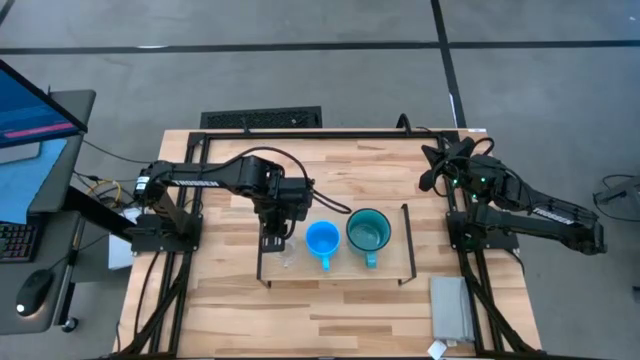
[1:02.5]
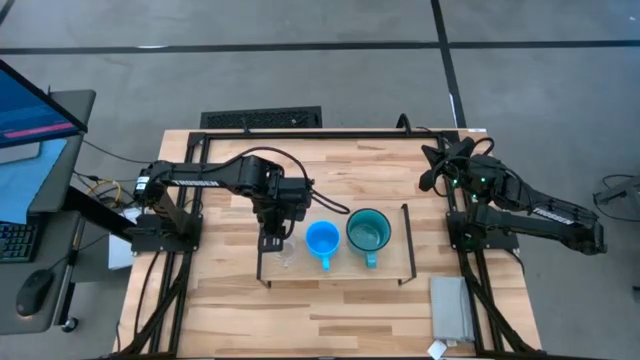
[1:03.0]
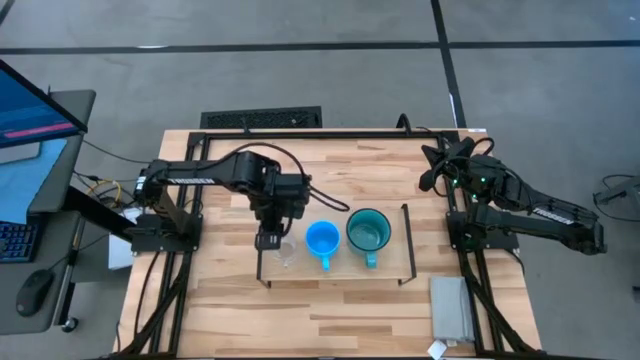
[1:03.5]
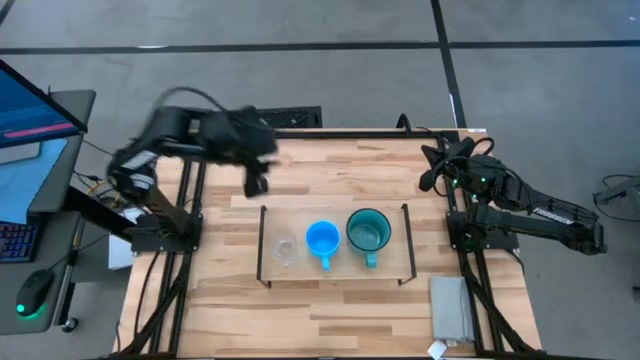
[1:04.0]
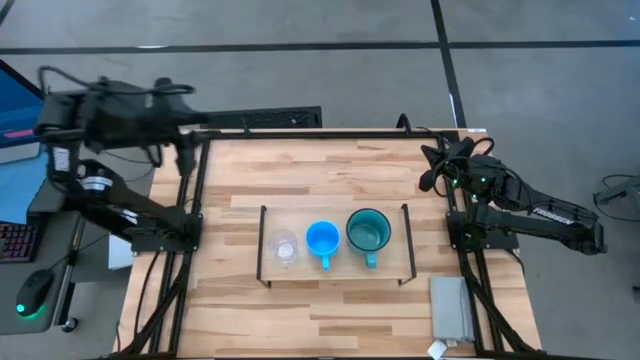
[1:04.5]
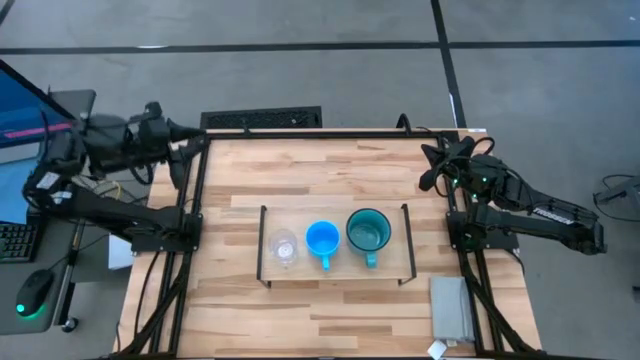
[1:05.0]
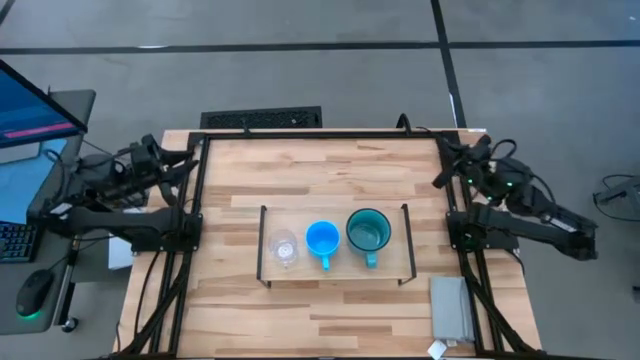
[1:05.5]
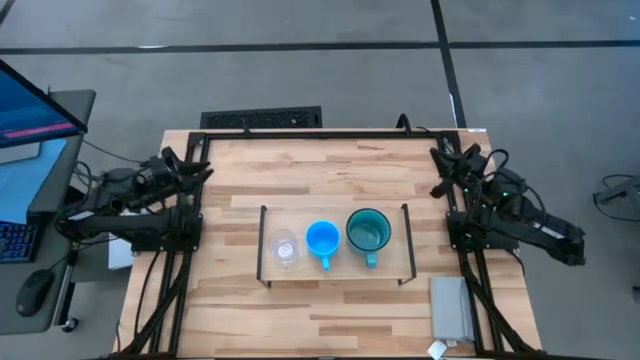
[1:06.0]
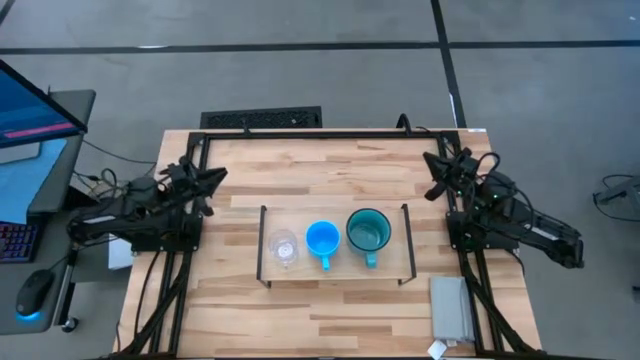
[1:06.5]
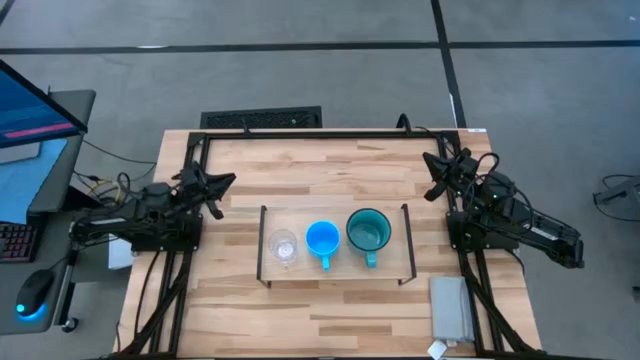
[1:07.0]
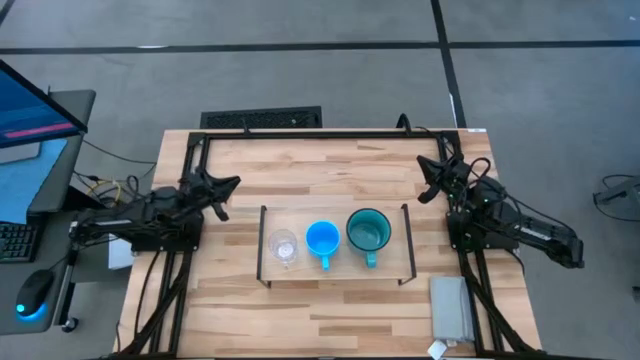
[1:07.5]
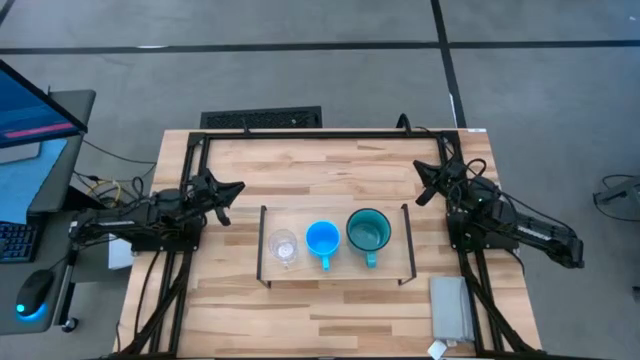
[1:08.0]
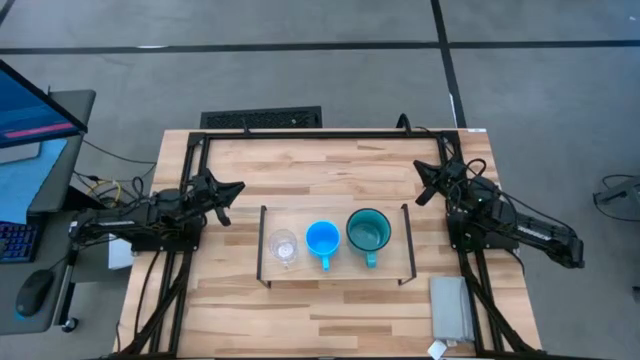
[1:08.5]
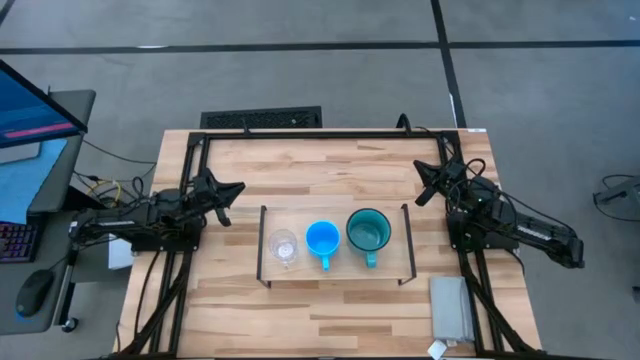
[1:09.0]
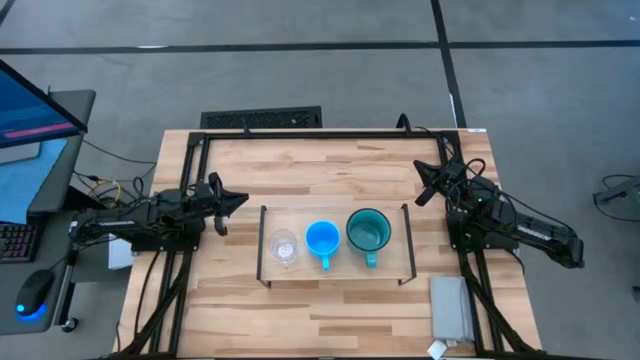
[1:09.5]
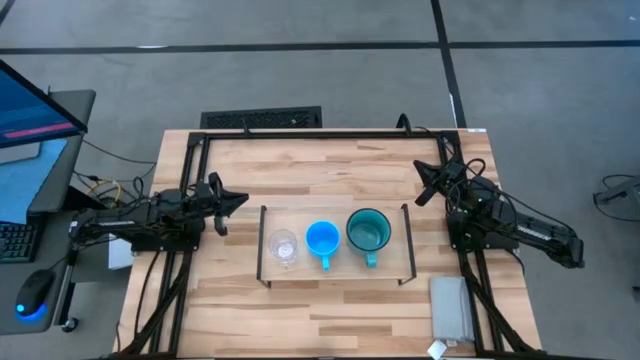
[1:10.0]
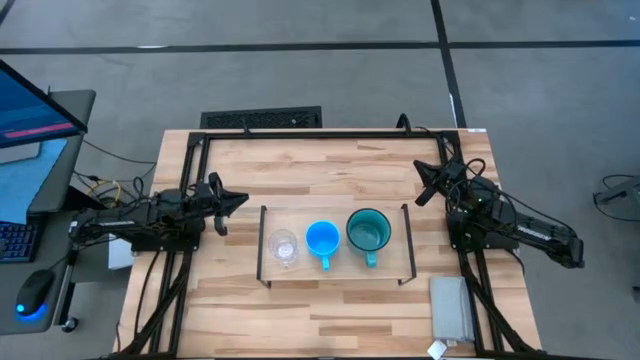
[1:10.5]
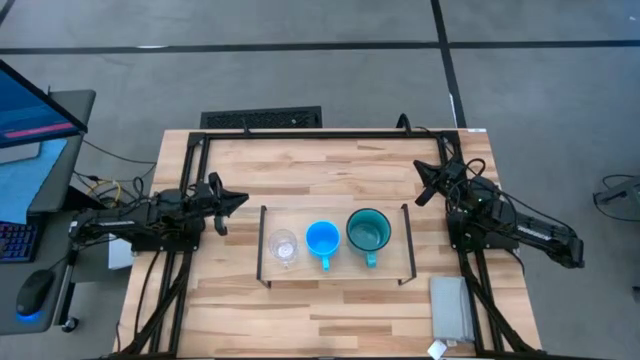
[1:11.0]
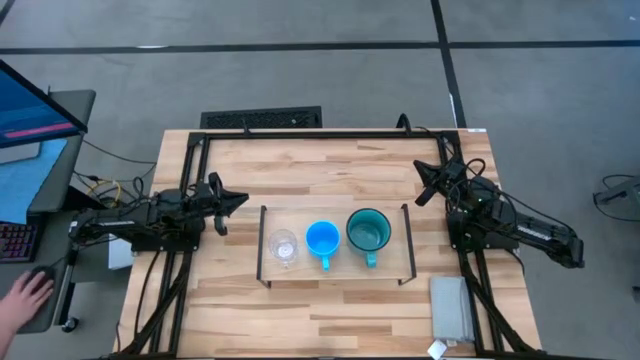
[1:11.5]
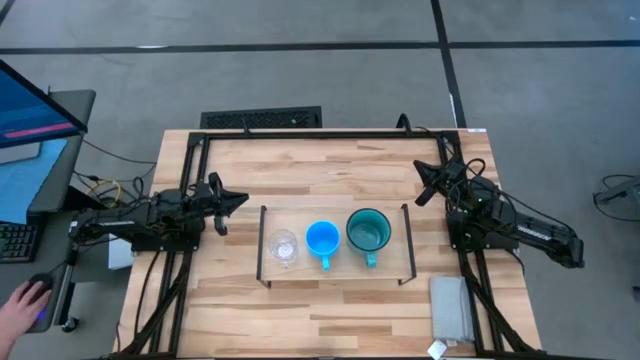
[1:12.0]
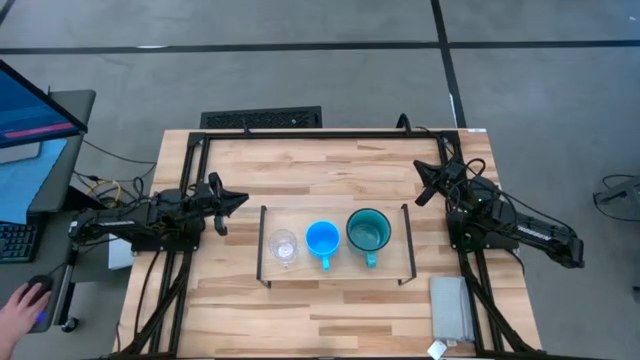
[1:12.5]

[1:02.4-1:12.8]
Task: Stack small to large cups/mugs on shelf
Return to Home Position

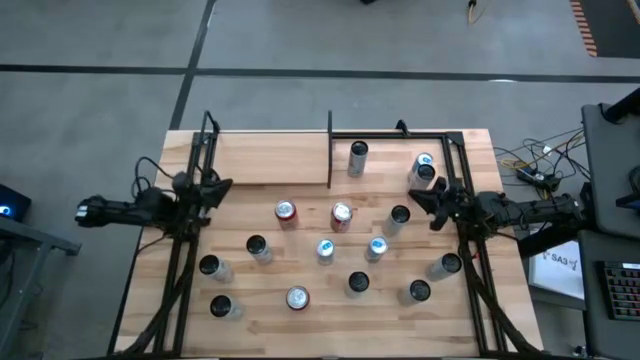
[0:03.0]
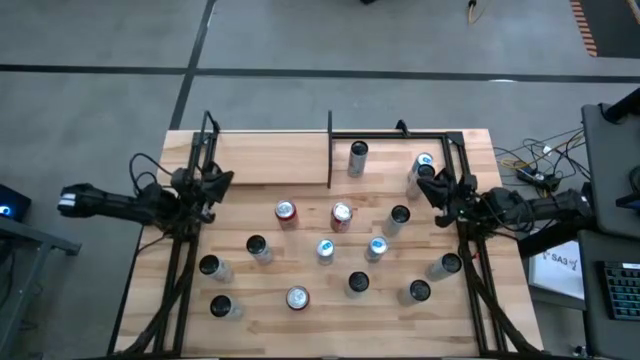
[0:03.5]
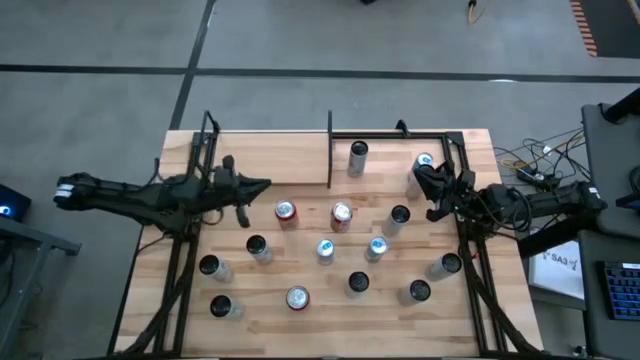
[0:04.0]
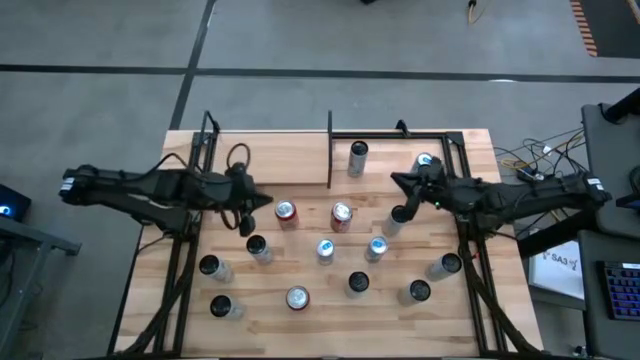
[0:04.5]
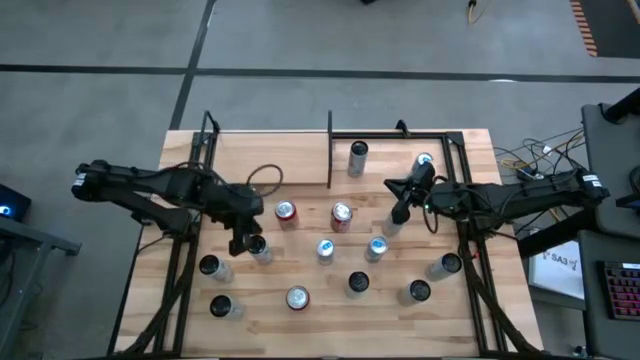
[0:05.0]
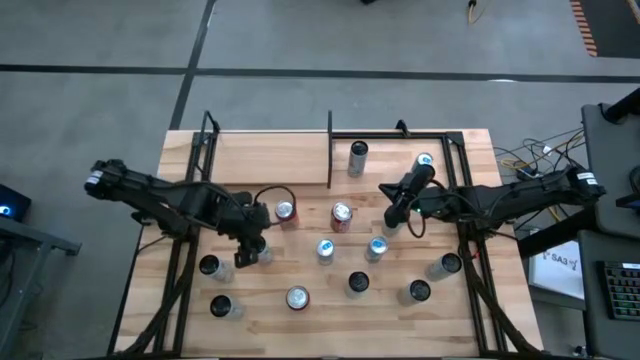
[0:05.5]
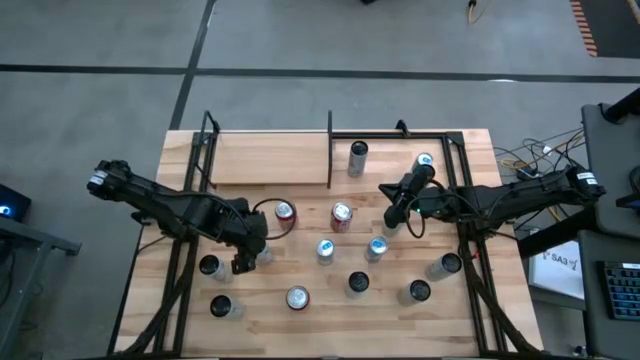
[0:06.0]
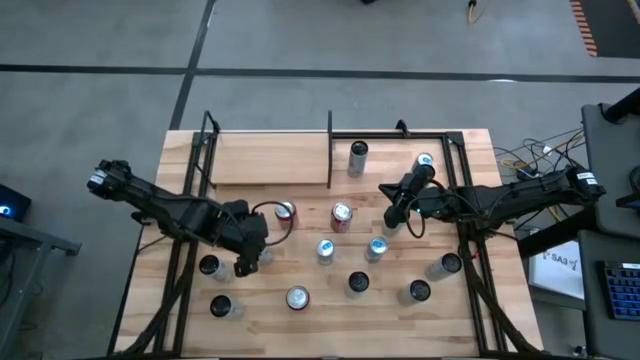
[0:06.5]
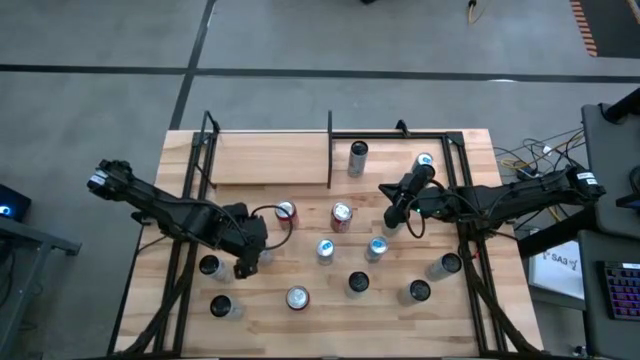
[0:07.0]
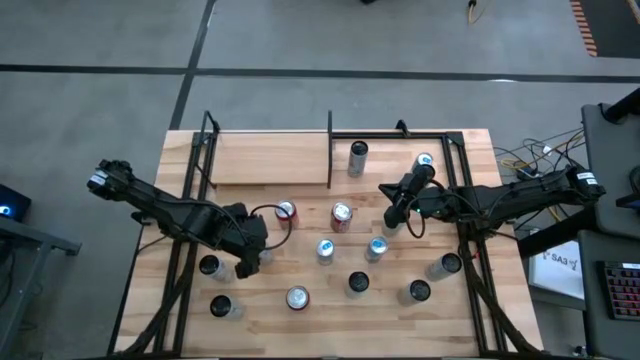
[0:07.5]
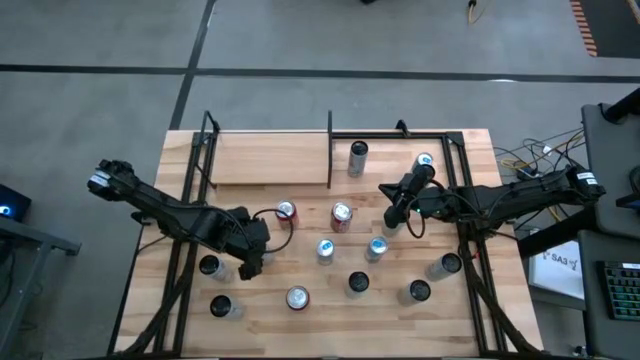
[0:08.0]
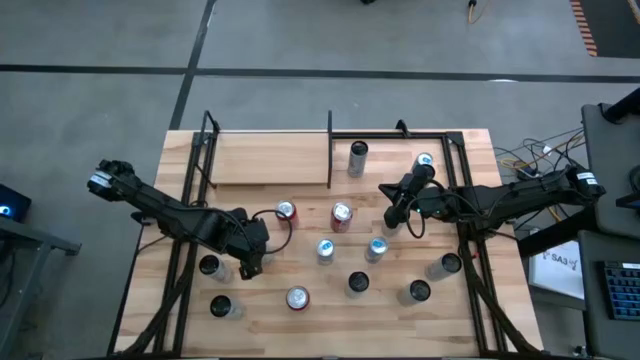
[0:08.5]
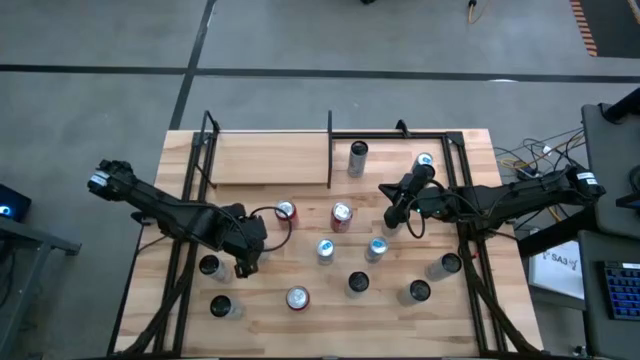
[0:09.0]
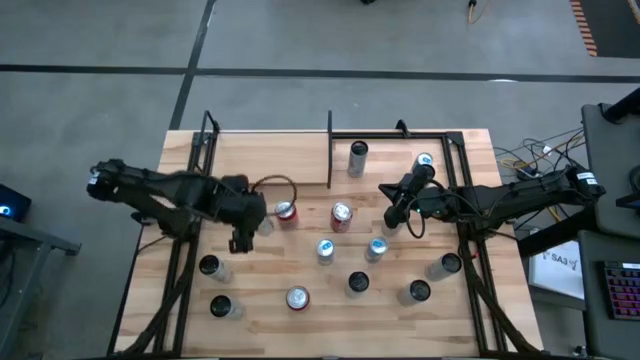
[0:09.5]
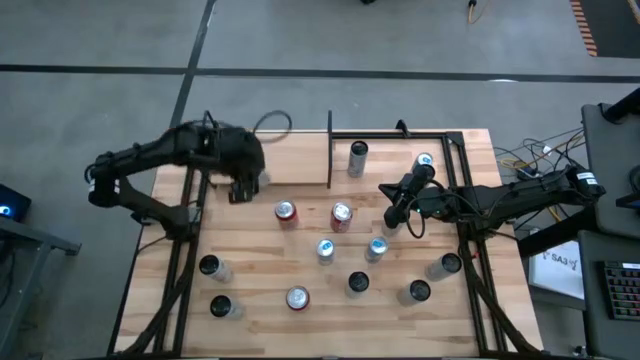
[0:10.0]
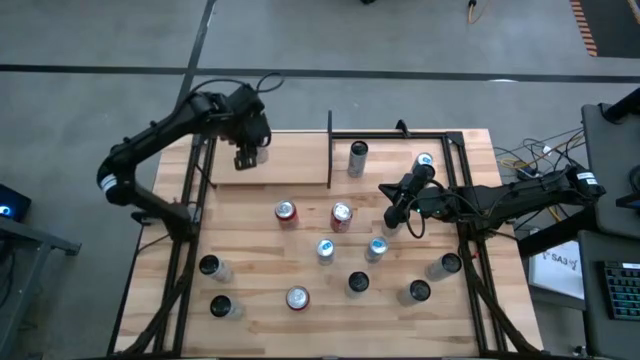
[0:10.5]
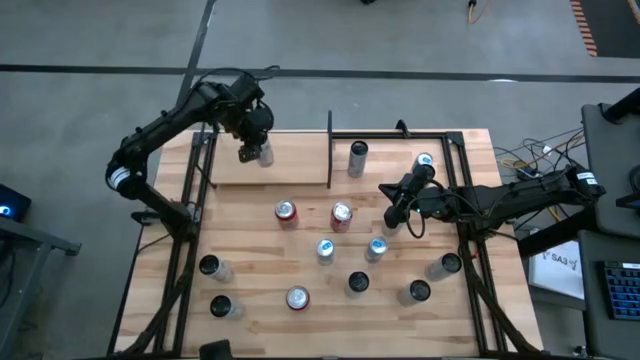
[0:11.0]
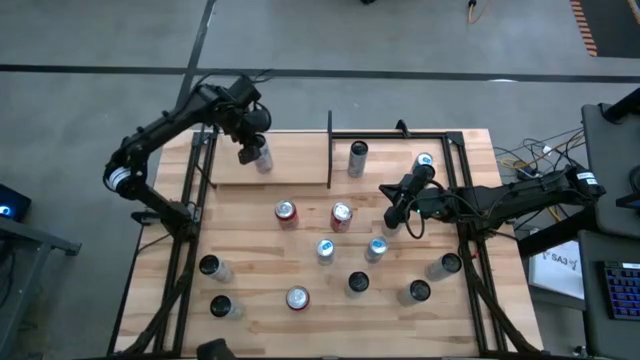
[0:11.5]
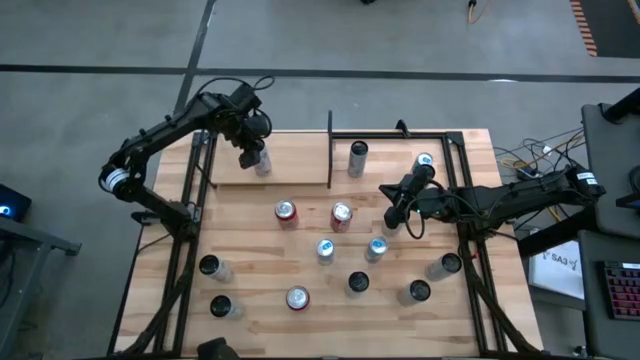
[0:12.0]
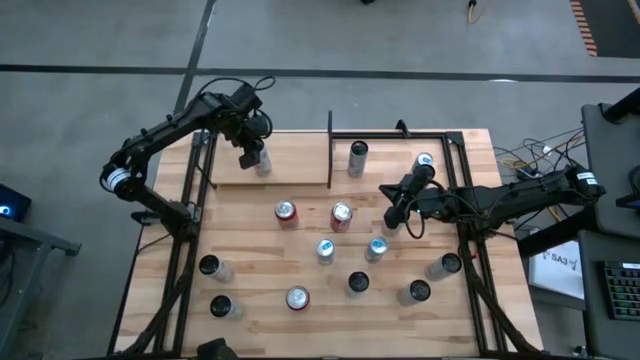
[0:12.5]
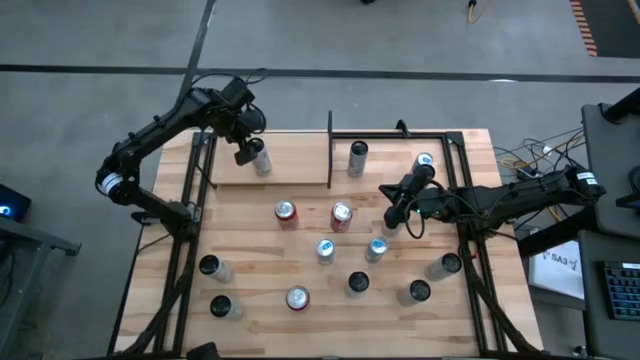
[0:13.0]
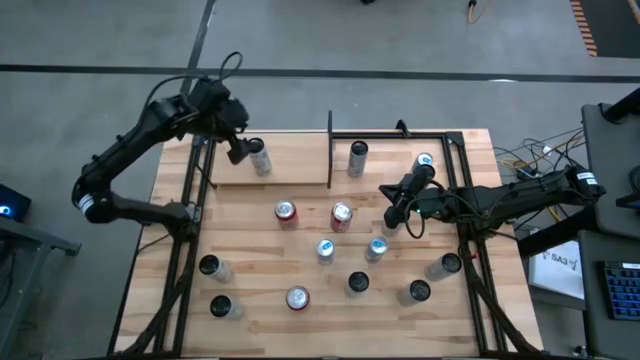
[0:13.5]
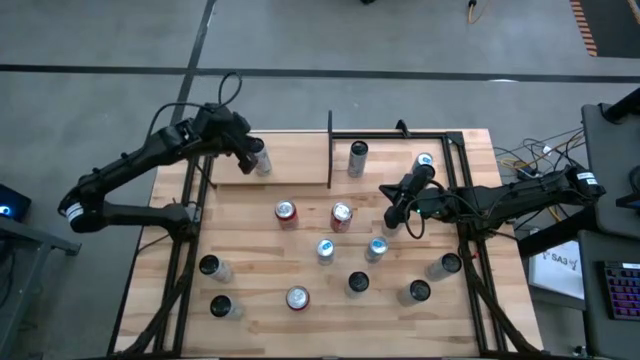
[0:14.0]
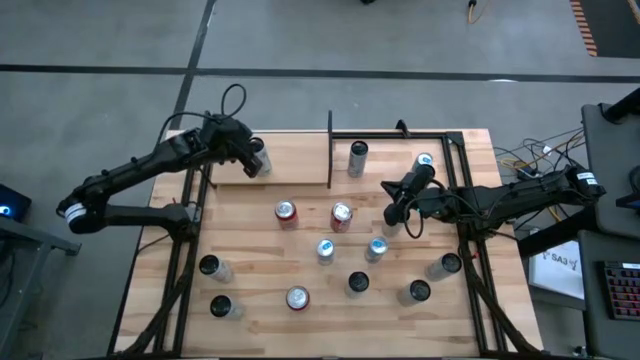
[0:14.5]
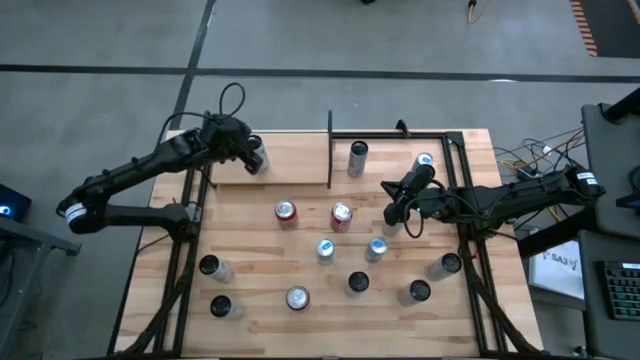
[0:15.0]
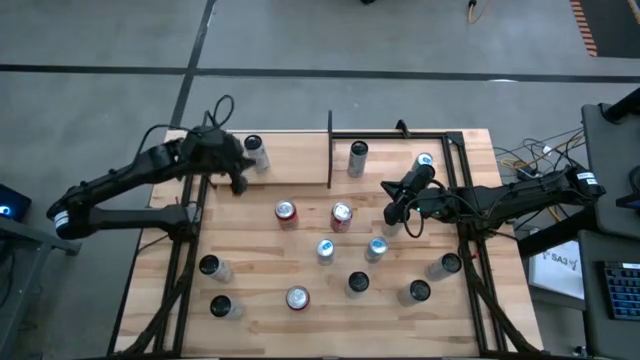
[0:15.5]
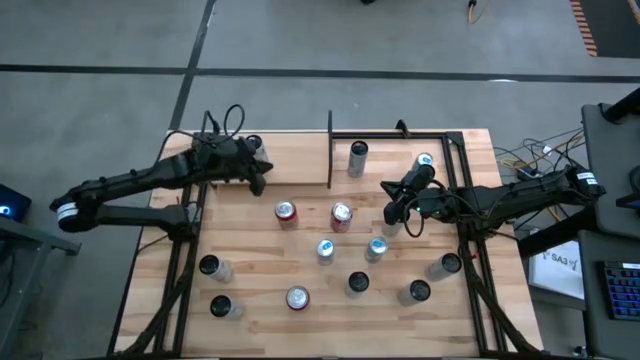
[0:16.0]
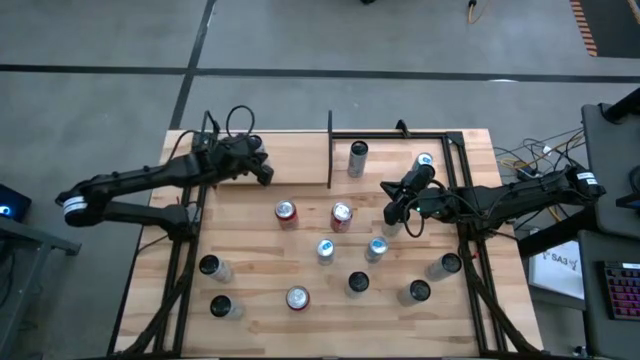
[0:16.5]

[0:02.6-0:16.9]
Task: Place canned beverage on shelf
Put the top right white and pink soda can on the shelf
